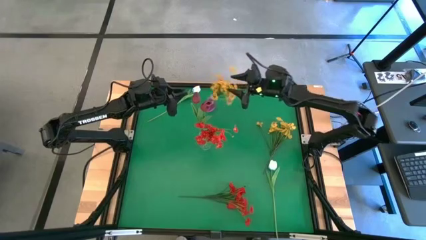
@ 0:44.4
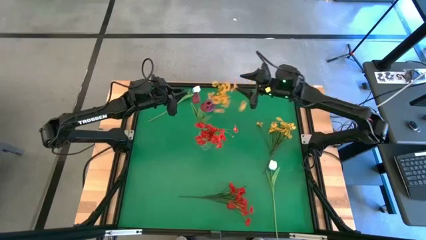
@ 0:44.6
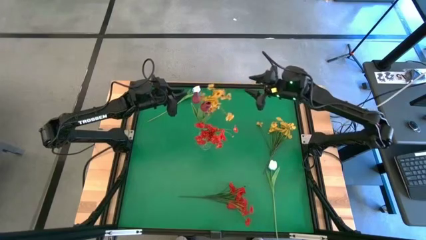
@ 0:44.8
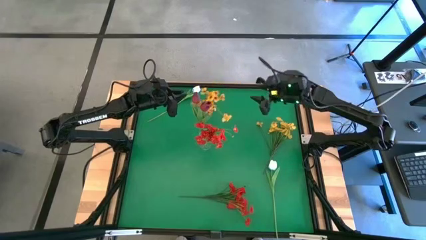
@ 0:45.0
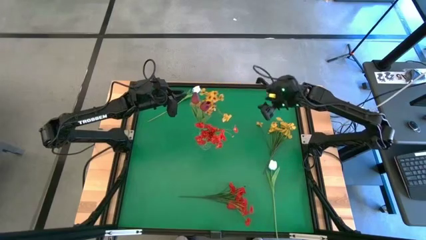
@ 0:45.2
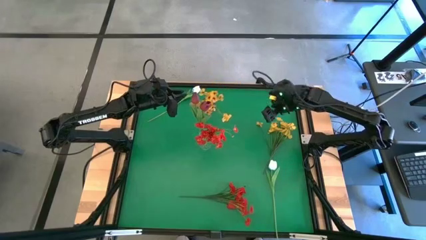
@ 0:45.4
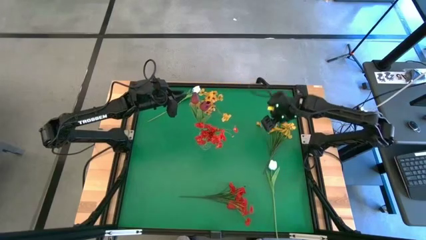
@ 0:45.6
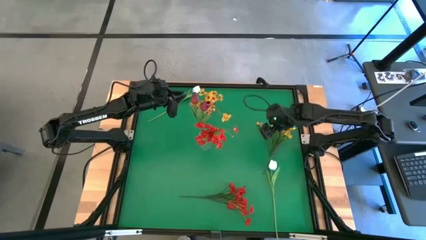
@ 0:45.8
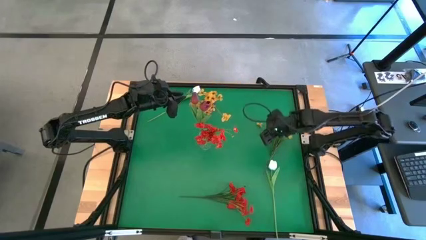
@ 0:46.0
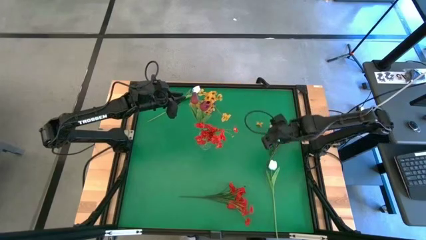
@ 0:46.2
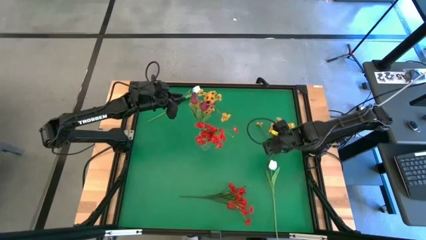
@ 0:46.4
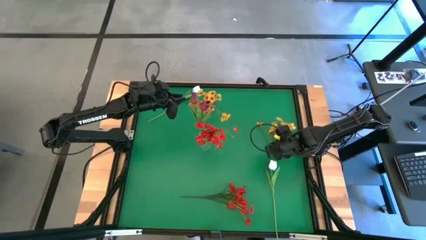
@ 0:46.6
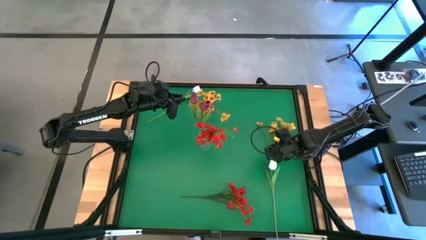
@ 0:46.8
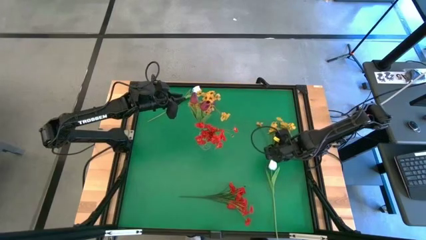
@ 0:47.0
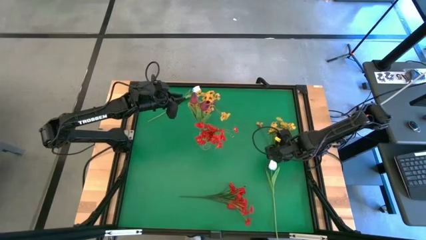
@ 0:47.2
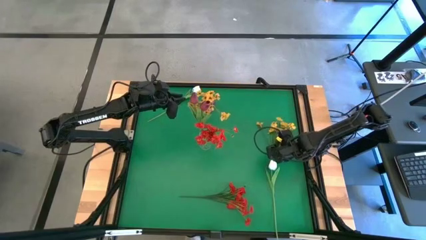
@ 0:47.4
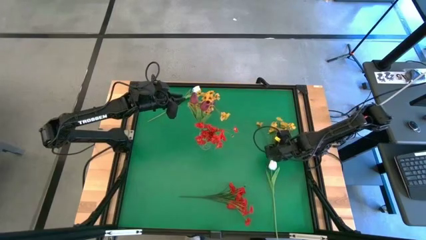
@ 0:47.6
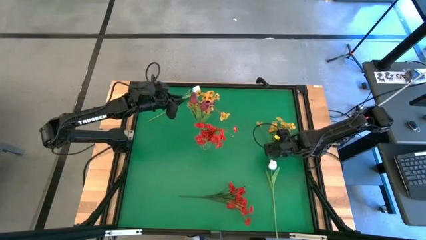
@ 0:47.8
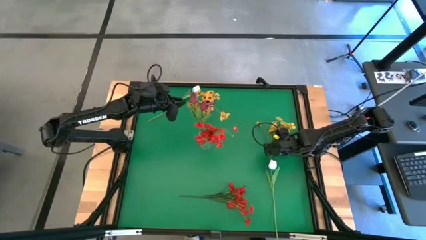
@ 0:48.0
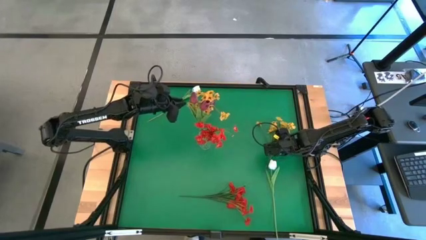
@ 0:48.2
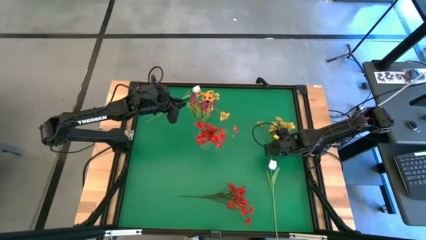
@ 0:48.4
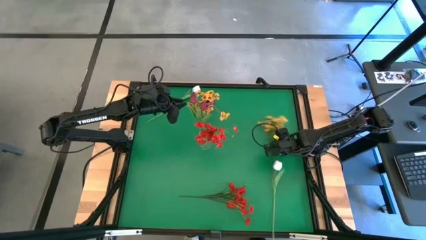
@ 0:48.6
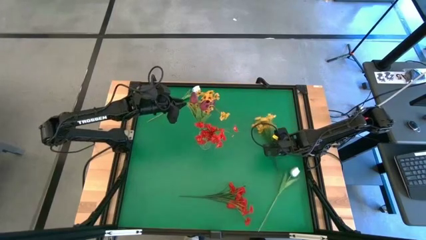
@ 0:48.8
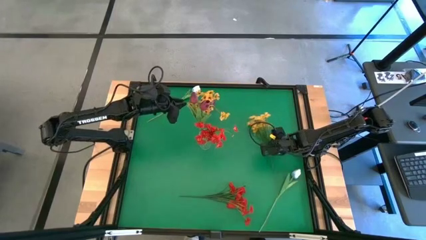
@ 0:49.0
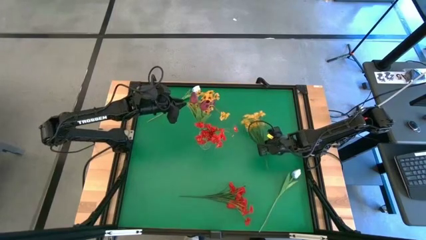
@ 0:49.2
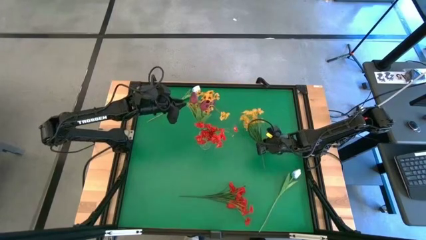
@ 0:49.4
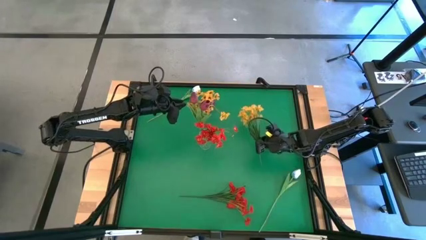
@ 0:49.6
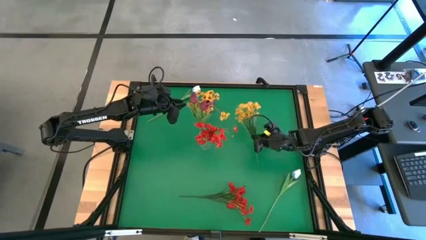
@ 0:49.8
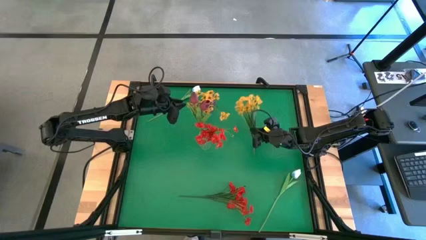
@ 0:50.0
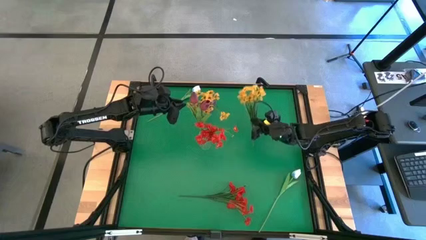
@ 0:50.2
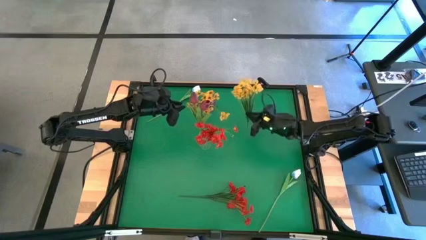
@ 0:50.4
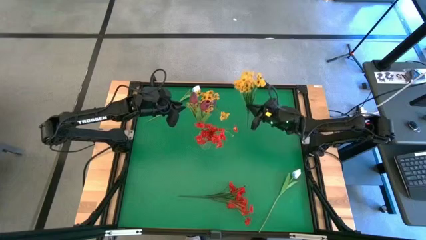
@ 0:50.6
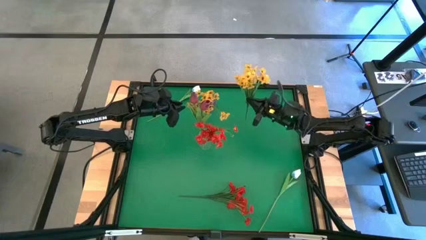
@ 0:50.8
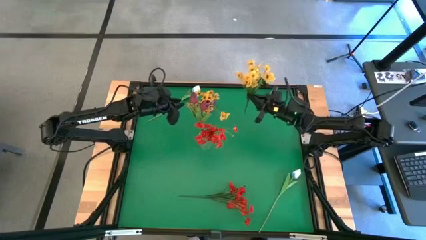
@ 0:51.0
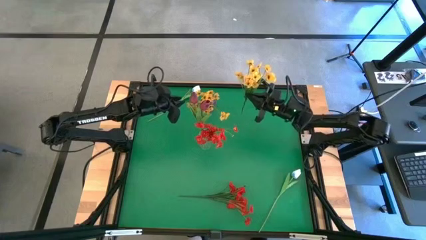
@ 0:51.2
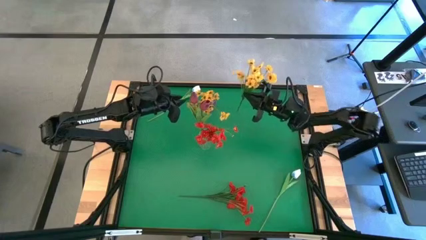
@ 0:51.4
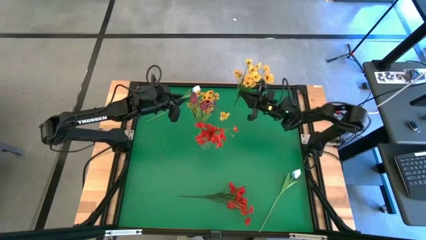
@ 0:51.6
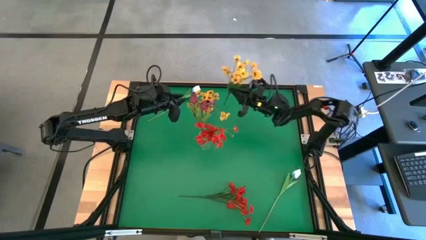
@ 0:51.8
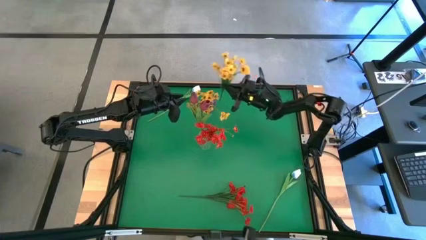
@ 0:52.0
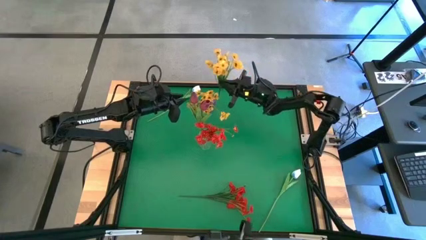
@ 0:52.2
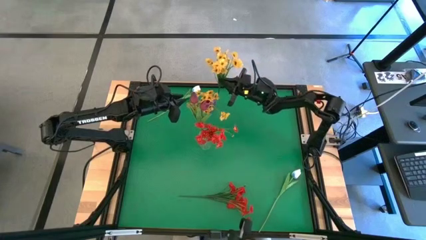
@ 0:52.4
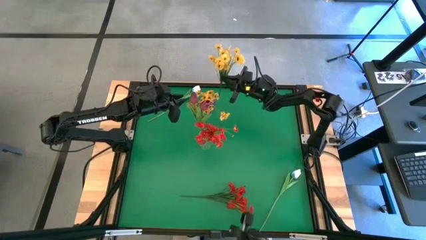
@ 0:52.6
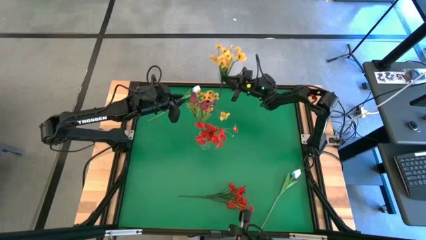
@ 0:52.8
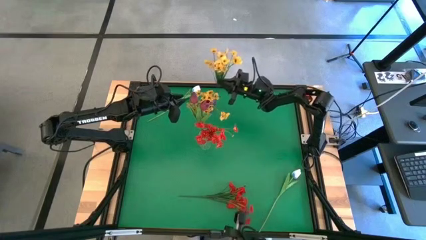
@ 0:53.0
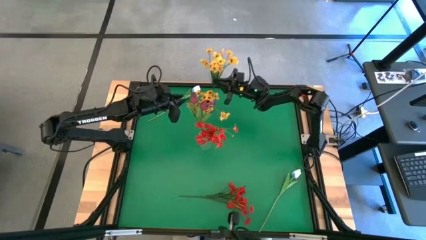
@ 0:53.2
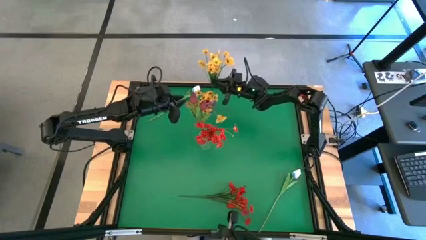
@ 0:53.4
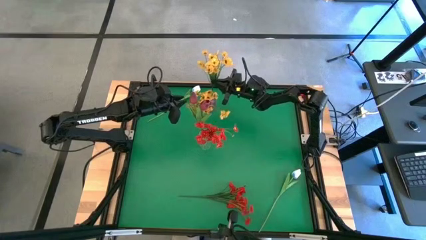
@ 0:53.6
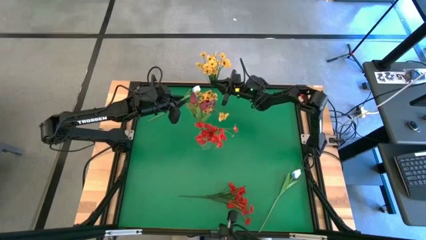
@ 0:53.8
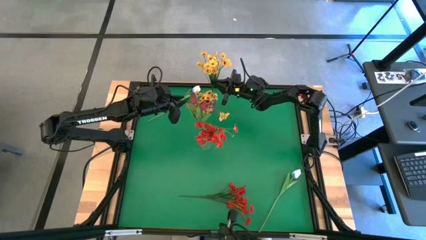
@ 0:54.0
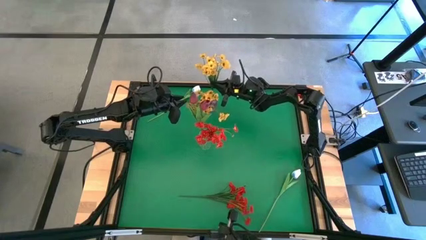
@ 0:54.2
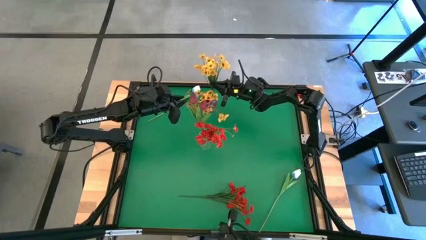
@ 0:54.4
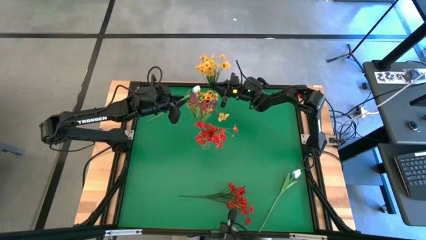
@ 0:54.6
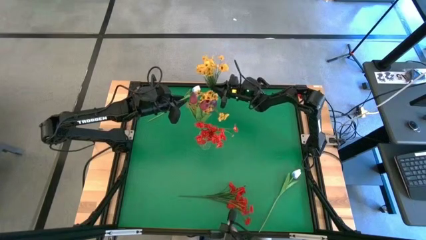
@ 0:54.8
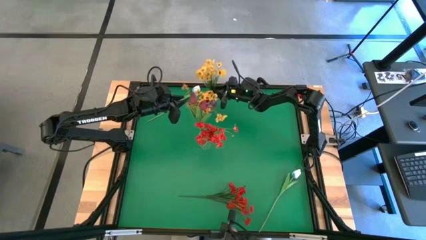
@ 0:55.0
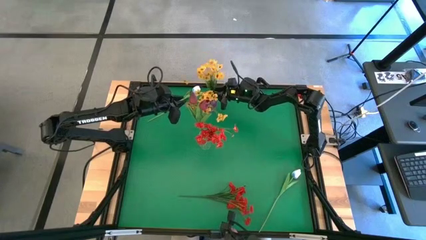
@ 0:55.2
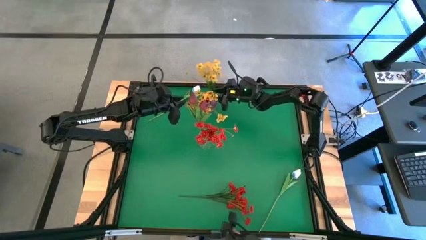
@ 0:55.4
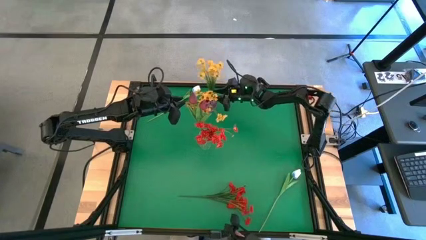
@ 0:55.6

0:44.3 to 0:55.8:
Task: Sort flowers into vase by color
Put the yellow flowers into the pink transparent vase
